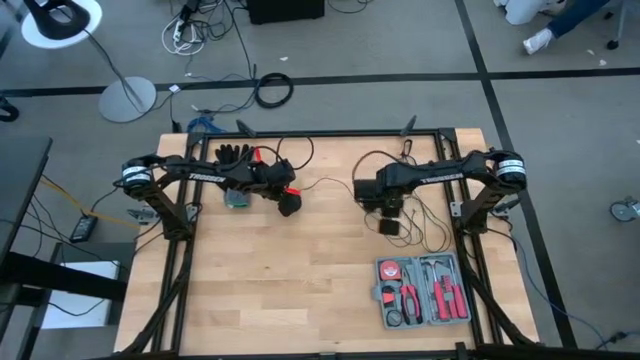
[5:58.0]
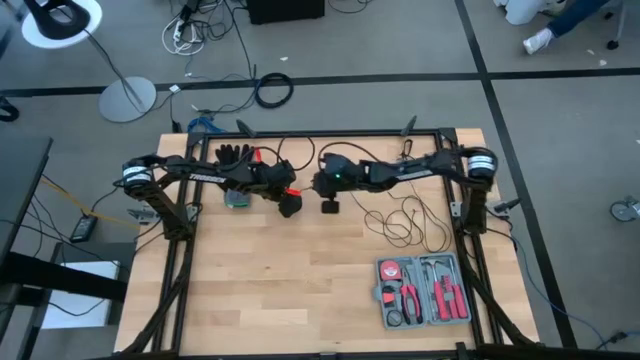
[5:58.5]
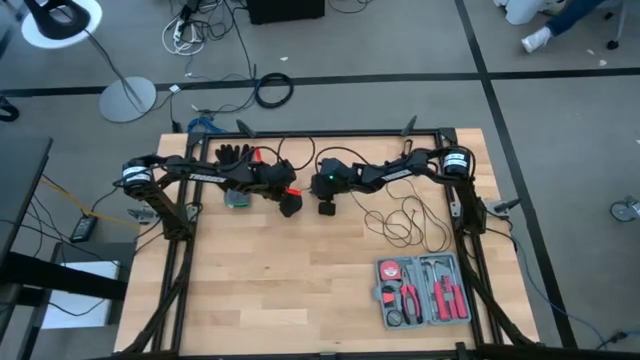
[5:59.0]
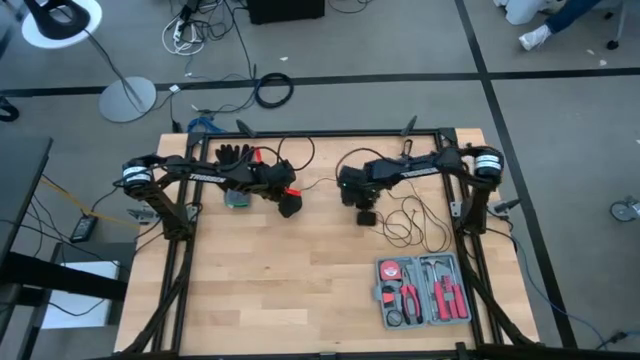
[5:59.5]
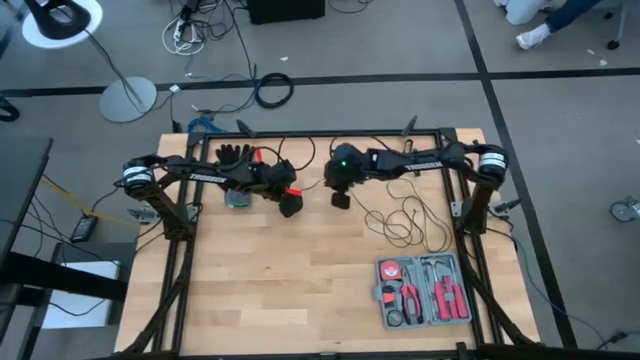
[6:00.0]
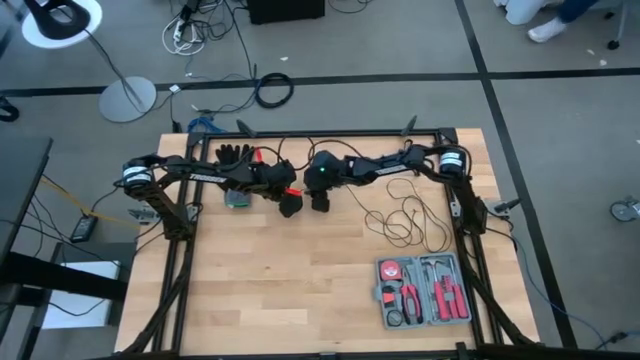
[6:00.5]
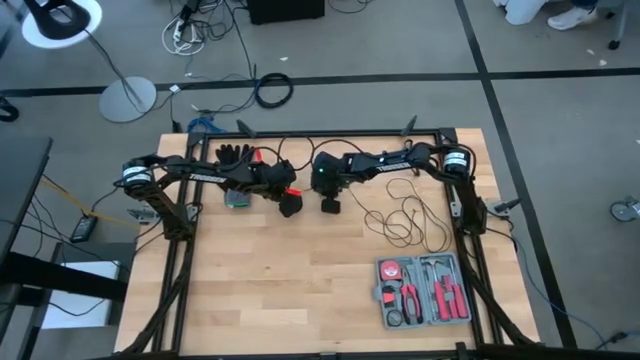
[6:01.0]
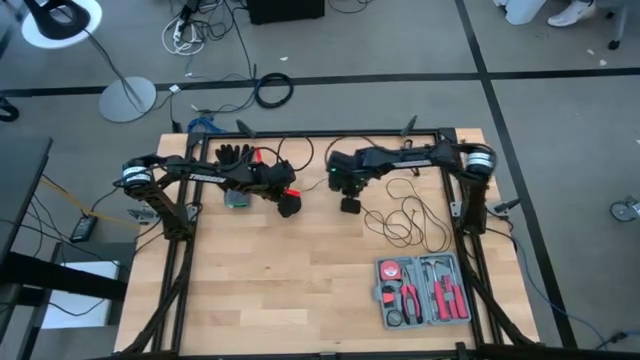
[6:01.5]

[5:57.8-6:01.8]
Task: Coil cords
Uncoil the black wire from the spool

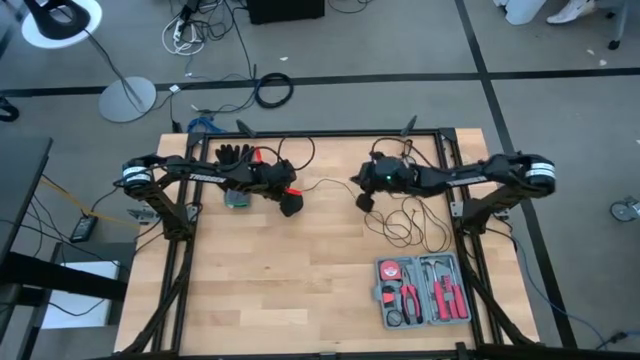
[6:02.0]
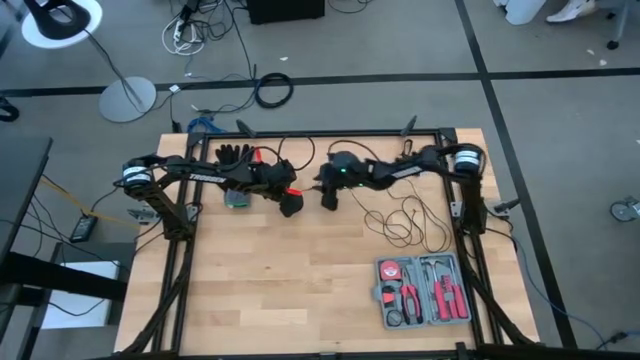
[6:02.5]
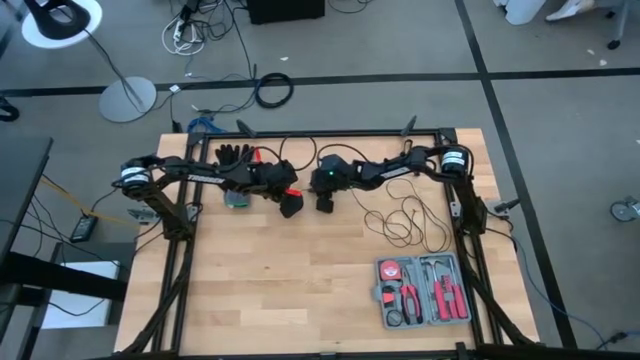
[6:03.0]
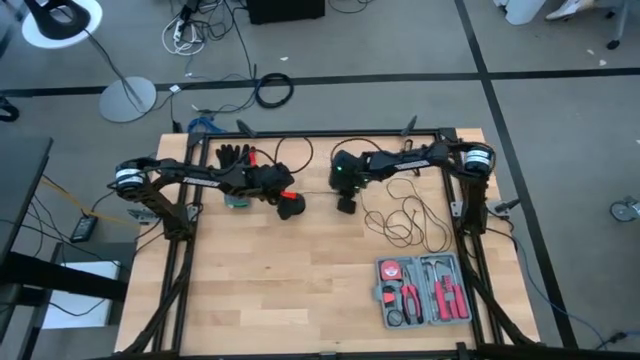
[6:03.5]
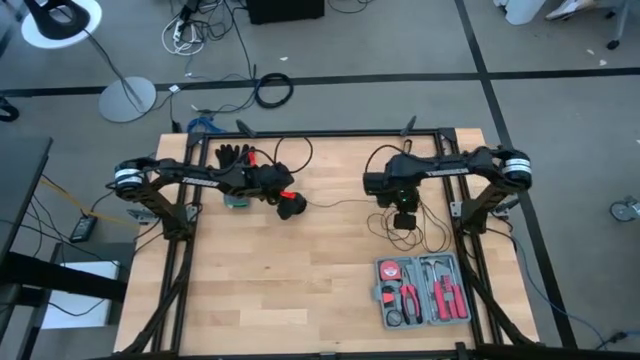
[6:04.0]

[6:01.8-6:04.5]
Uncoil the black wire from the spool

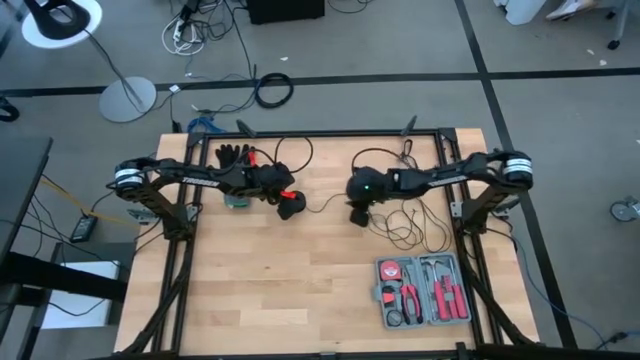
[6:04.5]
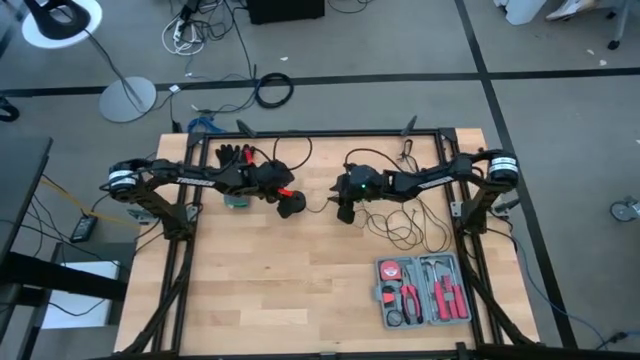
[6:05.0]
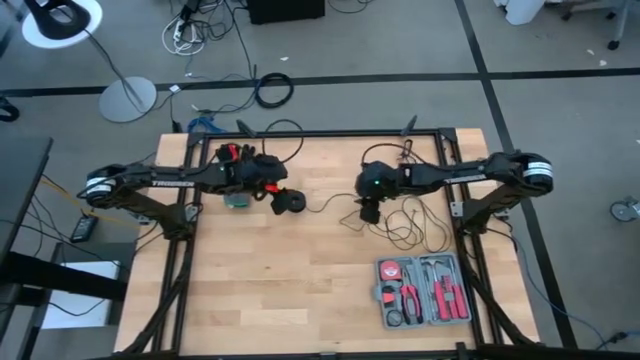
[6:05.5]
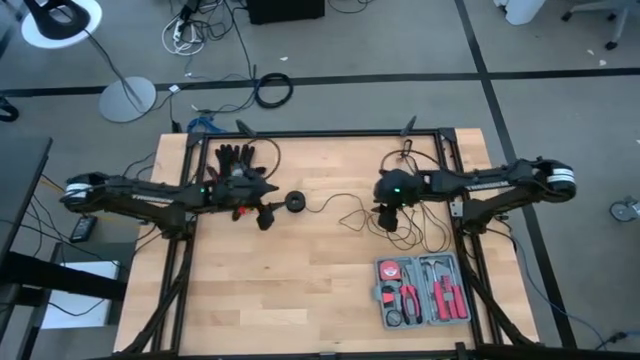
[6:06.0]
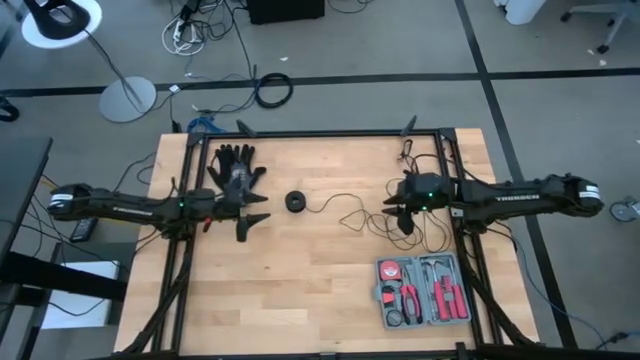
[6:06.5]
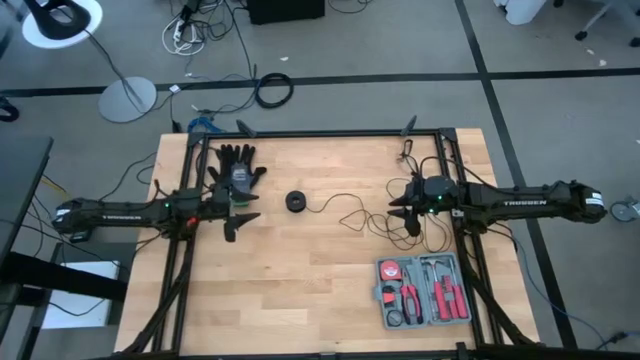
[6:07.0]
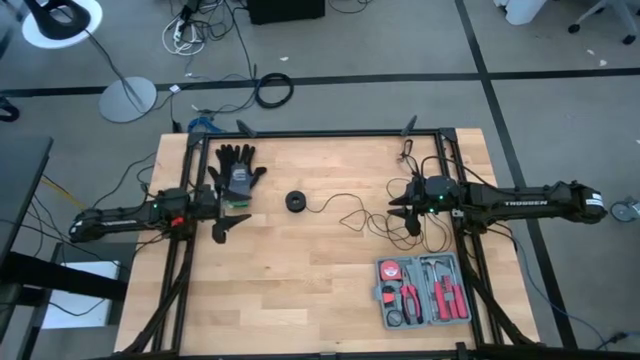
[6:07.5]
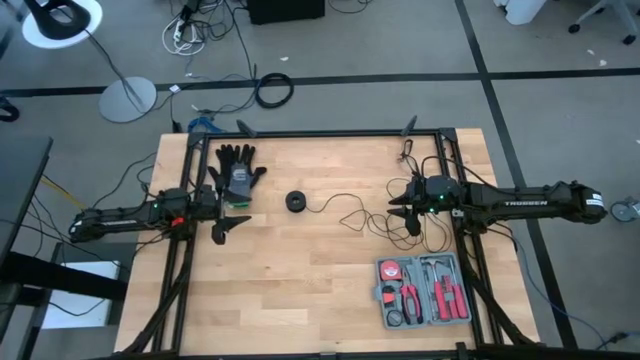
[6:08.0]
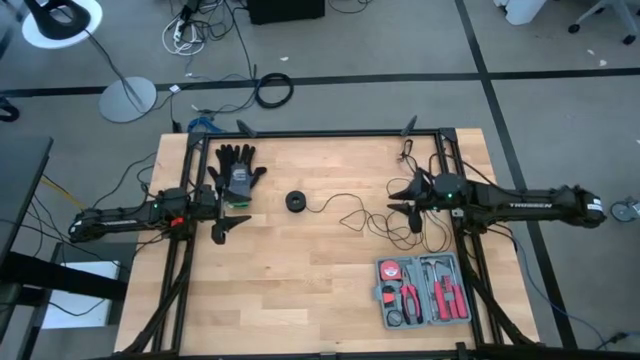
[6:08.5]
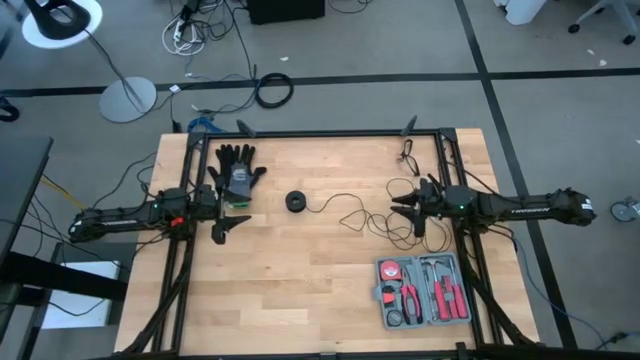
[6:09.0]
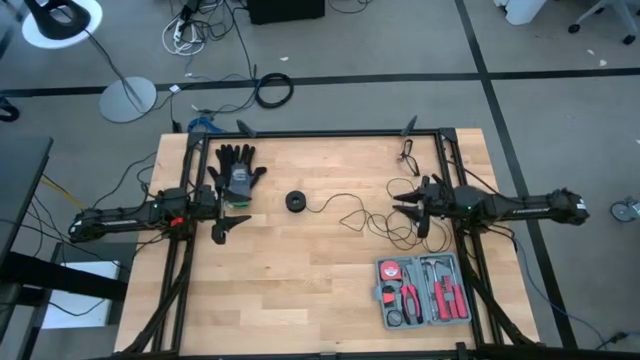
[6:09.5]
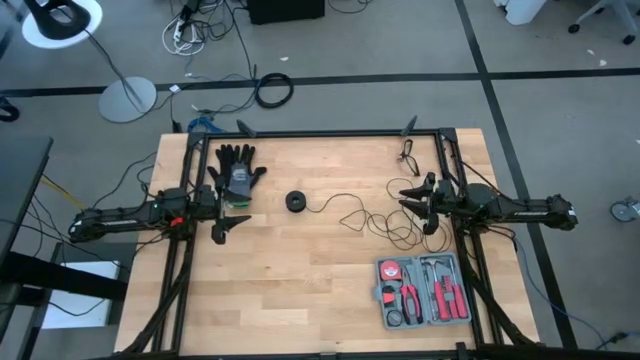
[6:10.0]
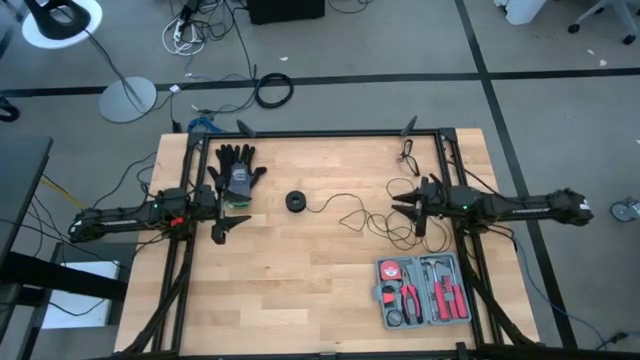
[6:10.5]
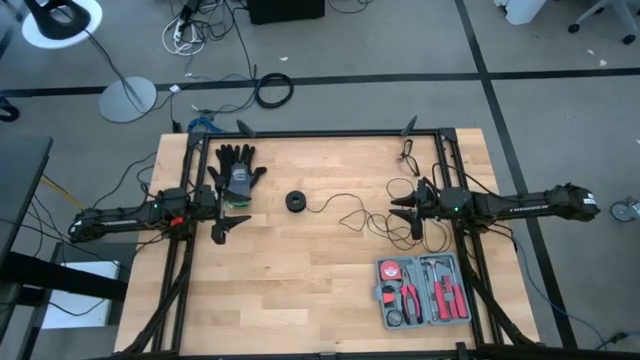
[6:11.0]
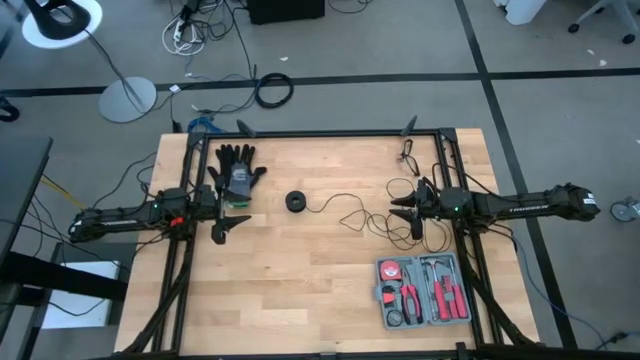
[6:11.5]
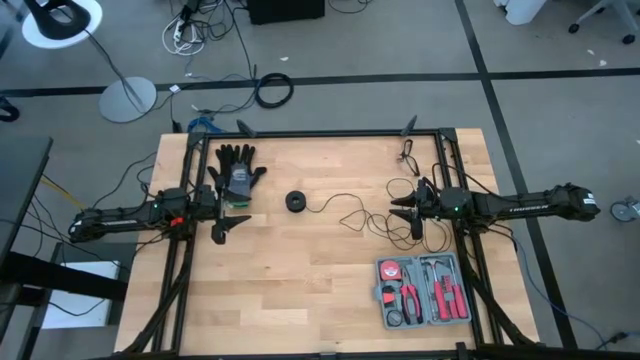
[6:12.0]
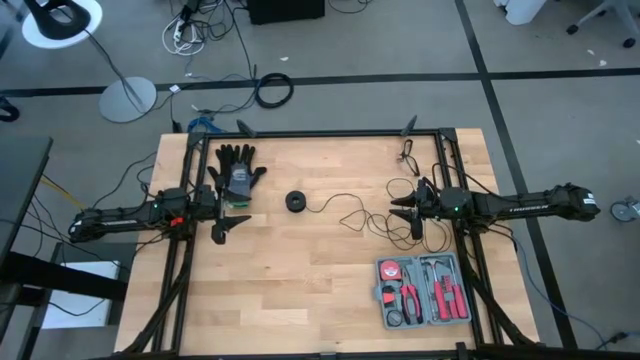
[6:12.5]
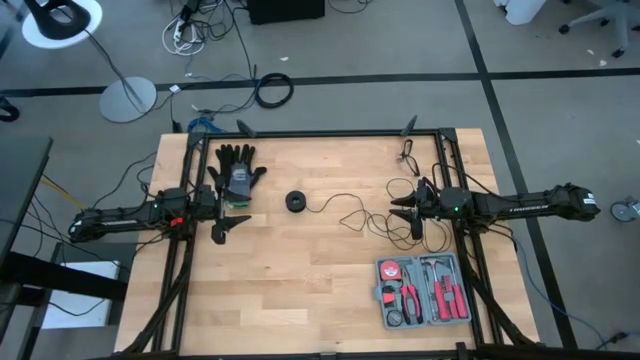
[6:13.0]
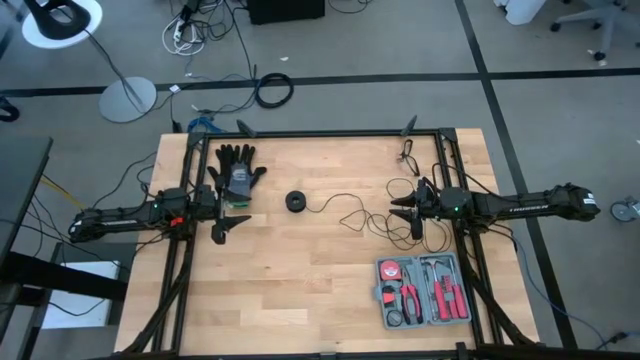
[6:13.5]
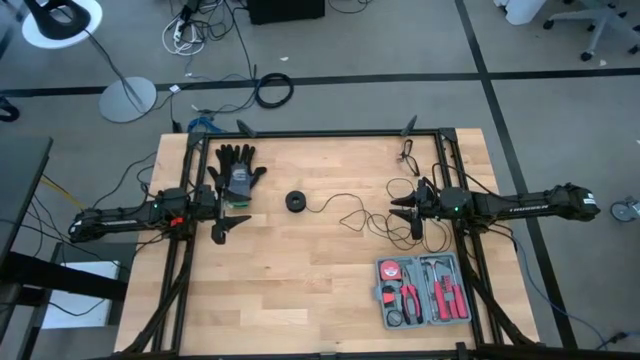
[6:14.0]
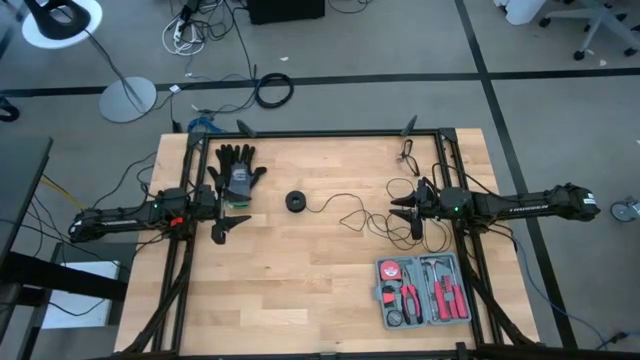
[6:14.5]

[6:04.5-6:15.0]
Return to Home Position

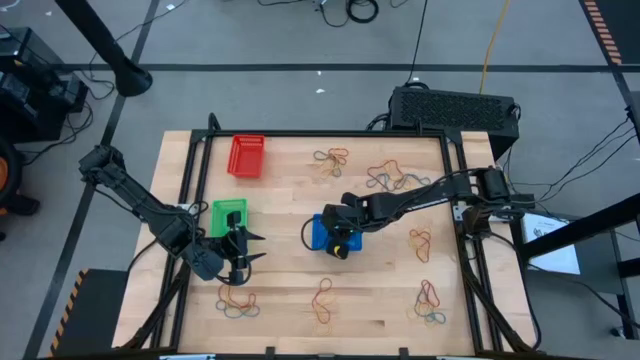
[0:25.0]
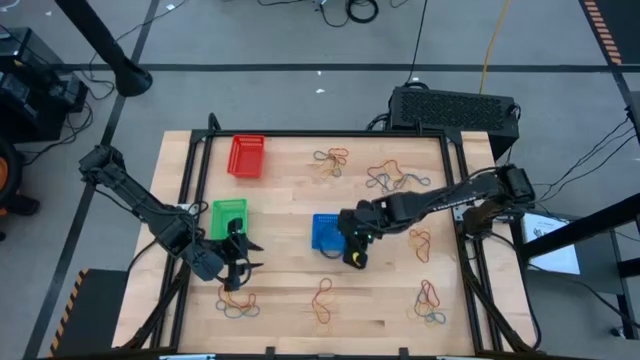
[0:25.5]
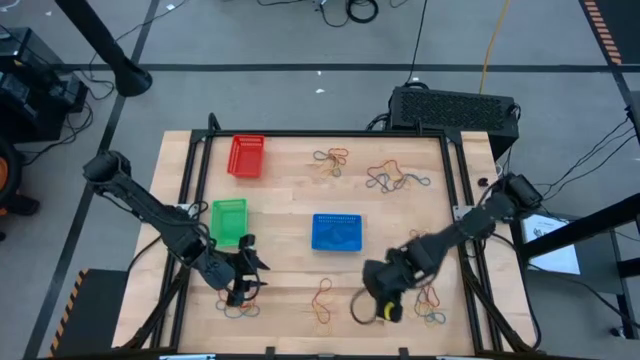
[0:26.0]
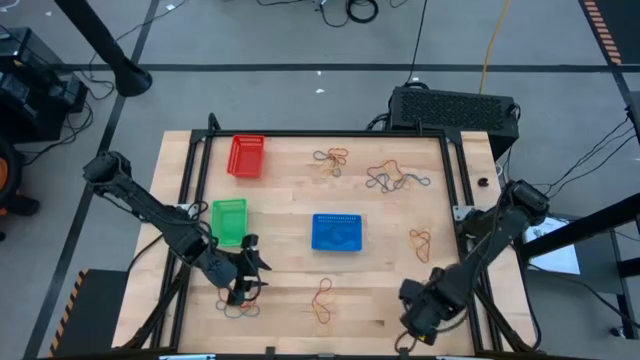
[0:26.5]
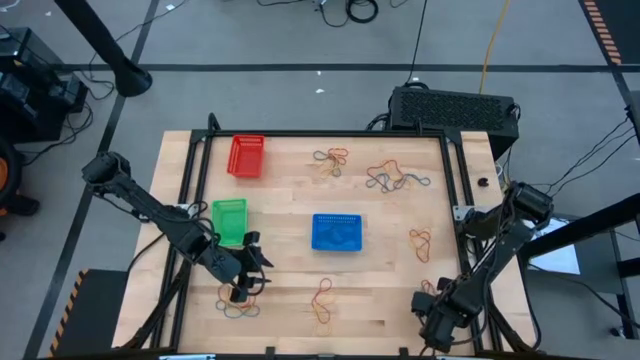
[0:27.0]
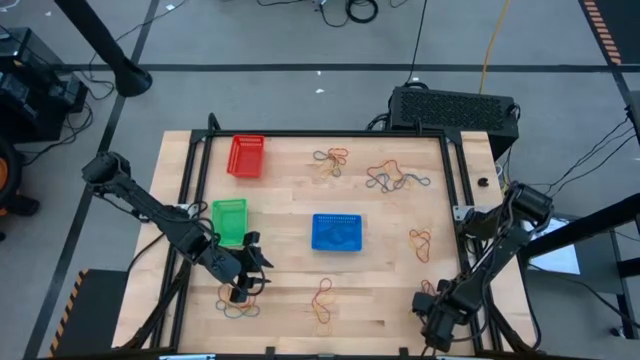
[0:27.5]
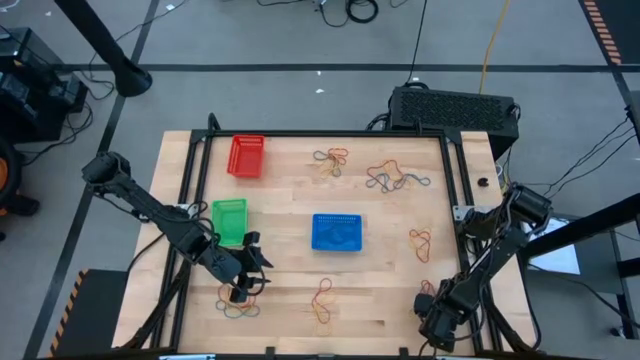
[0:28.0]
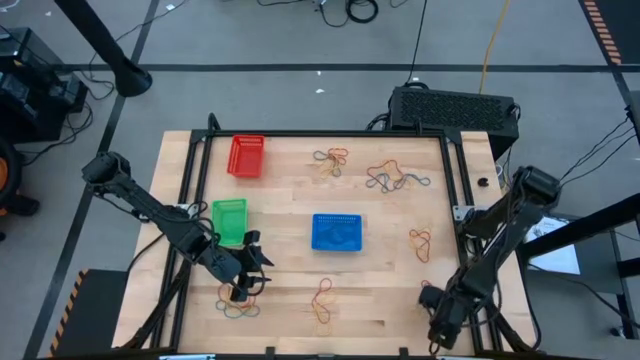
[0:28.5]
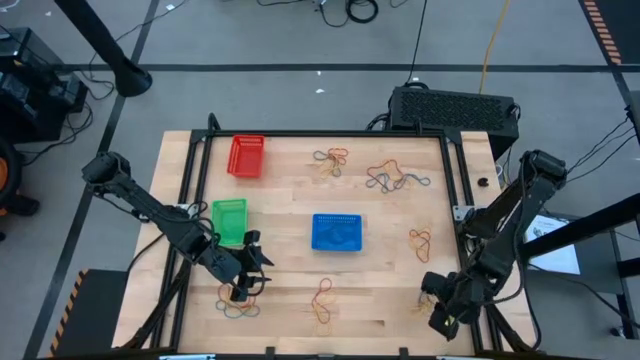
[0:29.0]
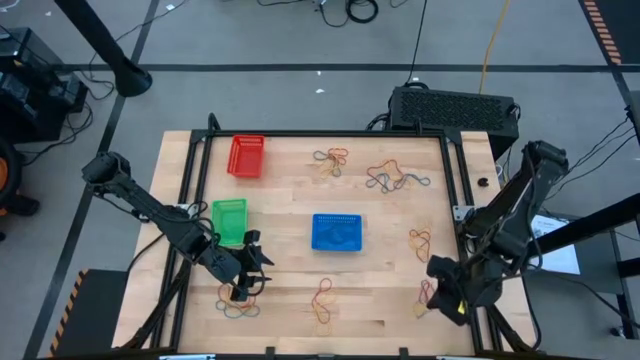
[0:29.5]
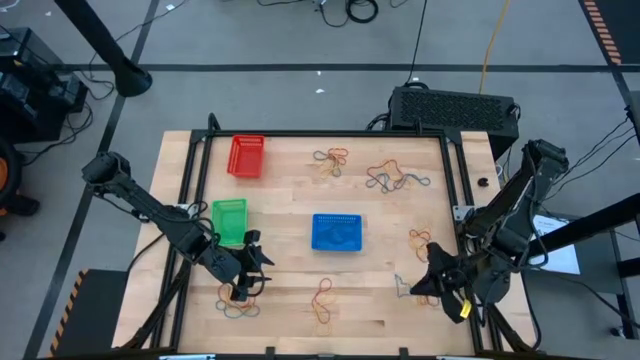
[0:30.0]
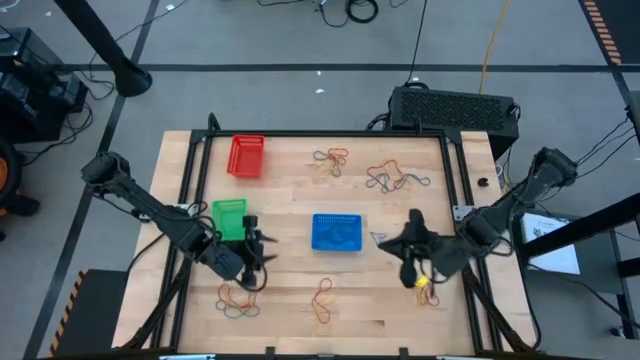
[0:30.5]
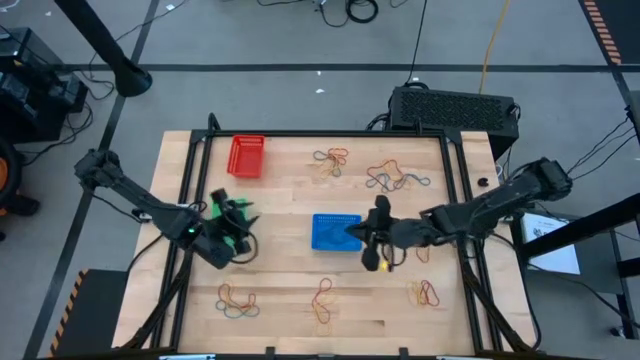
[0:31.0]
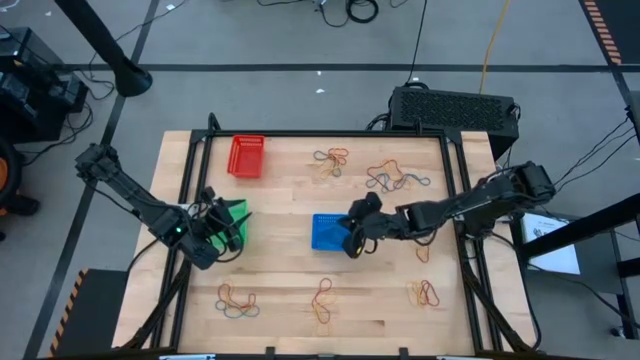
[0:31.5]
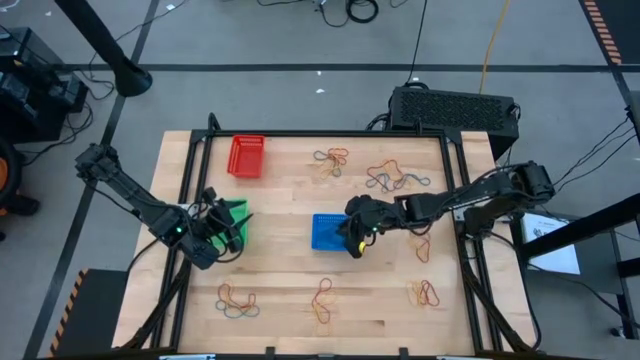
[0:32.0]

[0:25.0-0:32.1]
Task: Sort rubber bands into baskets
Put the blue rubber band into the blue bin
